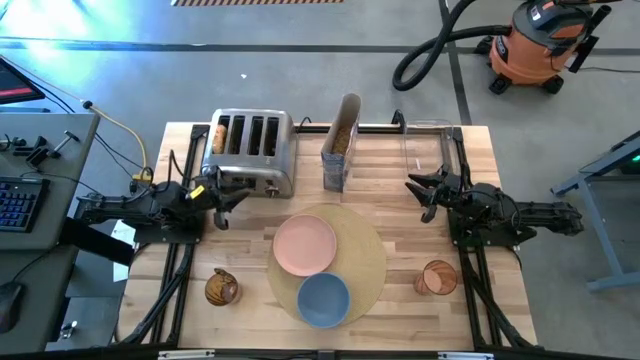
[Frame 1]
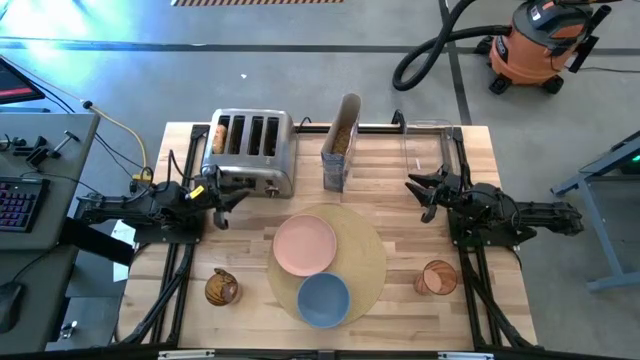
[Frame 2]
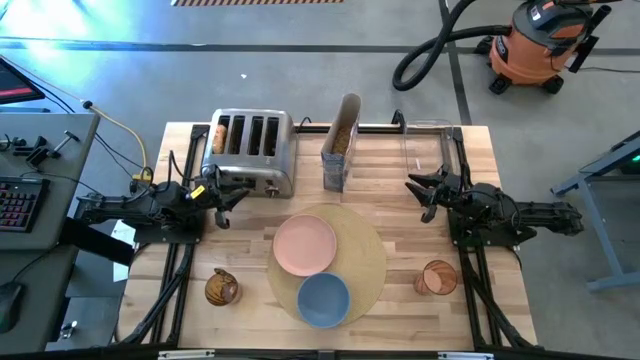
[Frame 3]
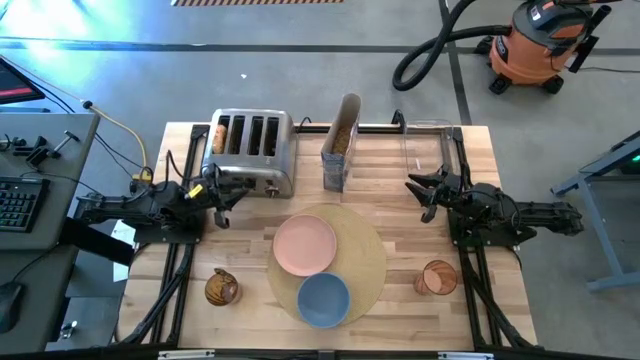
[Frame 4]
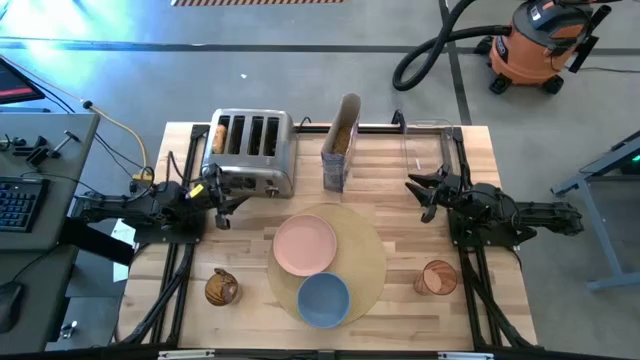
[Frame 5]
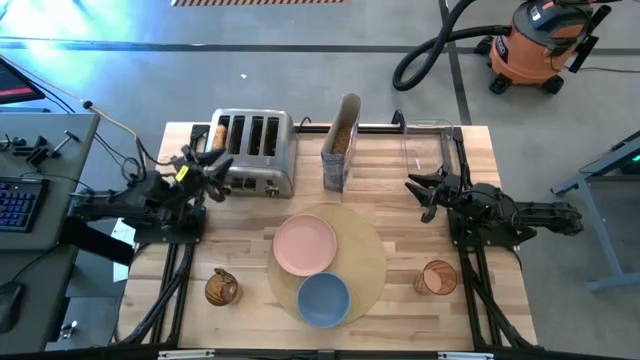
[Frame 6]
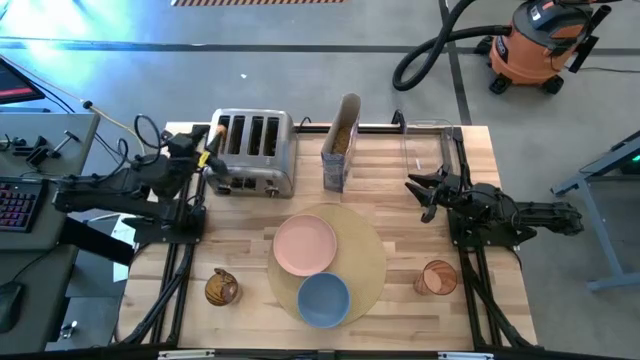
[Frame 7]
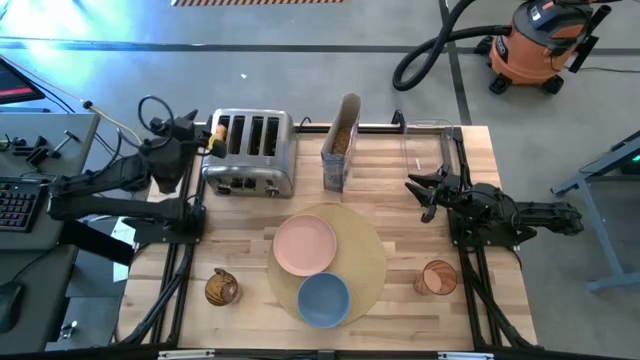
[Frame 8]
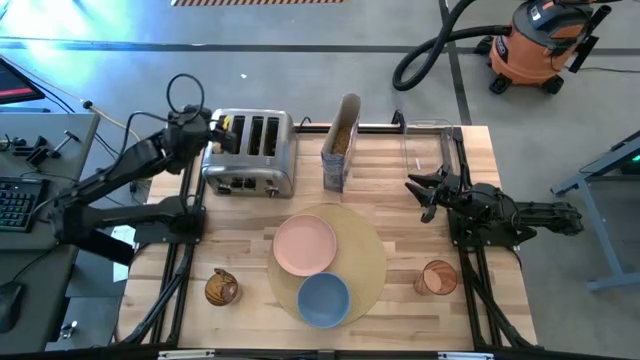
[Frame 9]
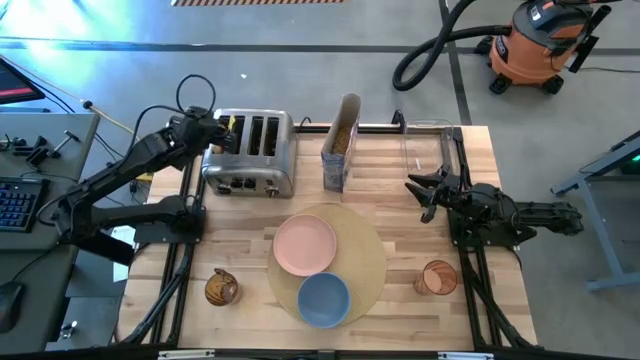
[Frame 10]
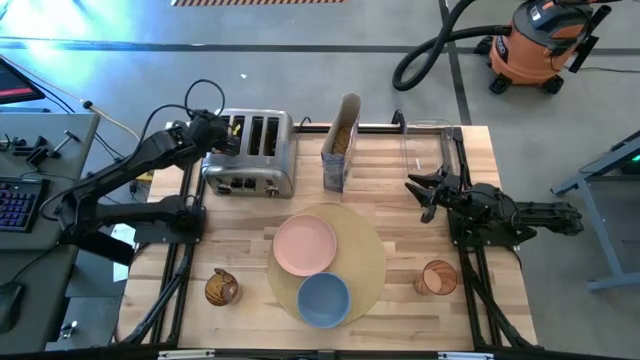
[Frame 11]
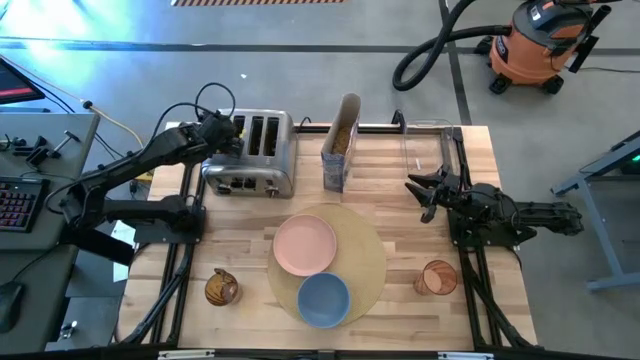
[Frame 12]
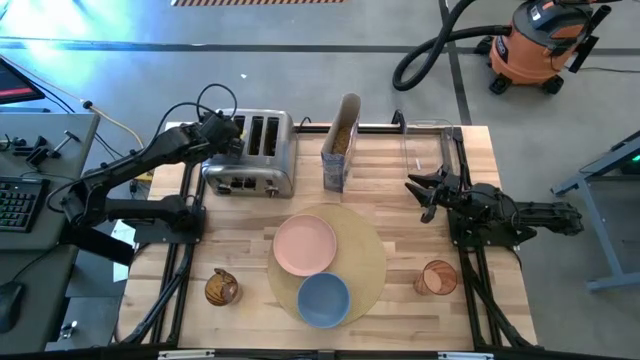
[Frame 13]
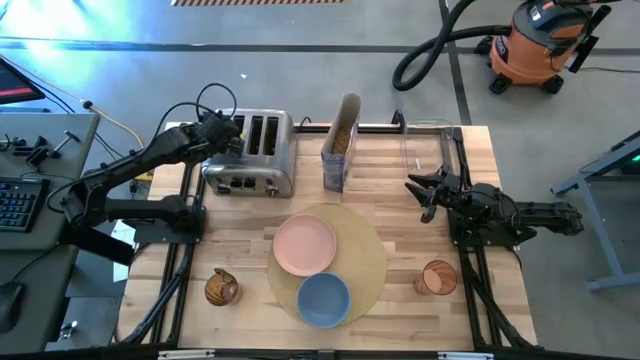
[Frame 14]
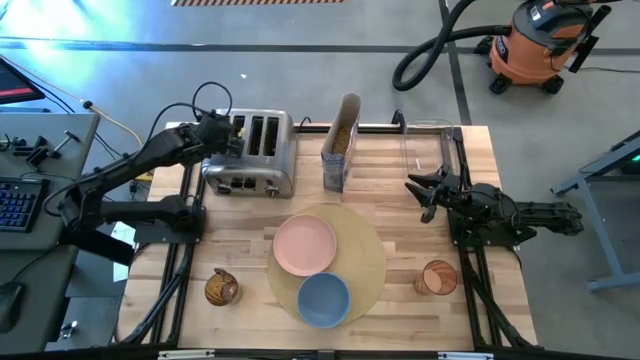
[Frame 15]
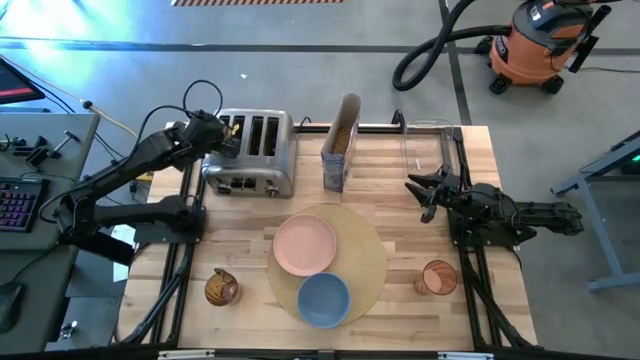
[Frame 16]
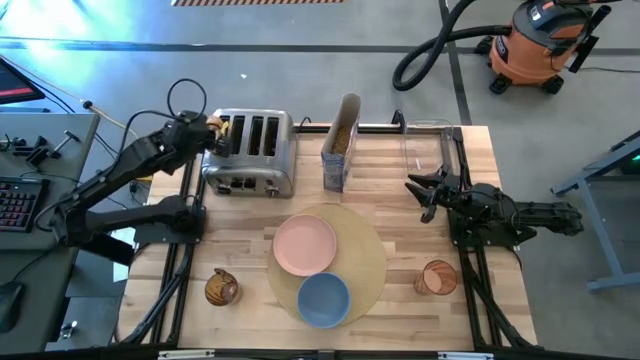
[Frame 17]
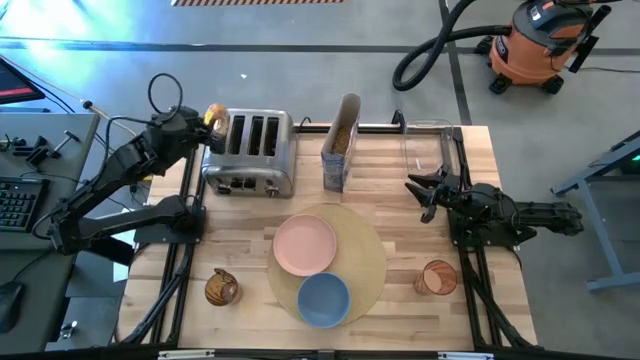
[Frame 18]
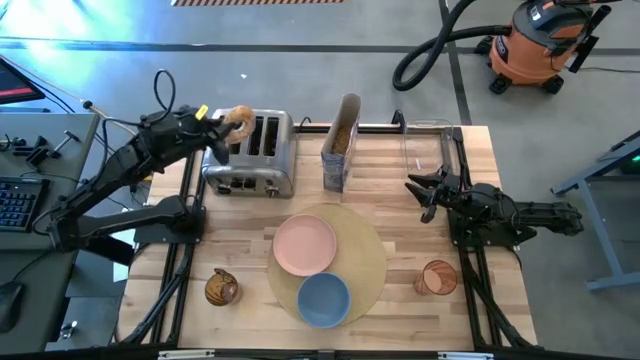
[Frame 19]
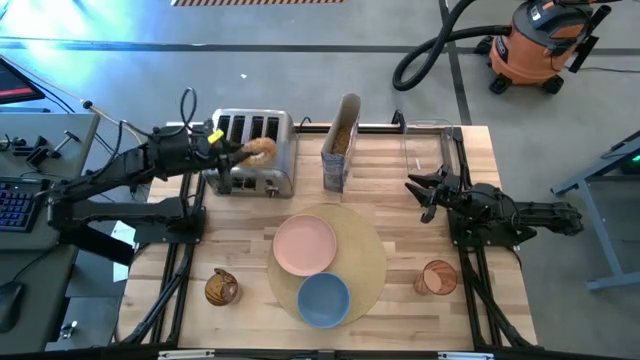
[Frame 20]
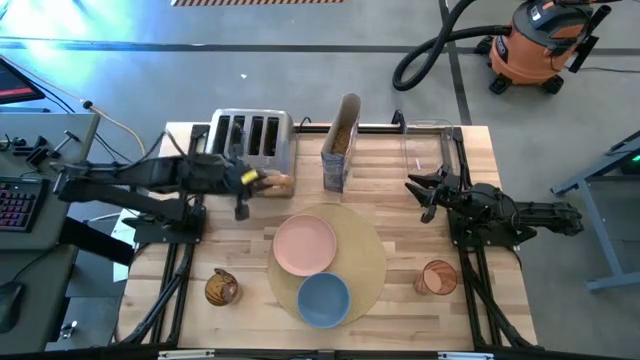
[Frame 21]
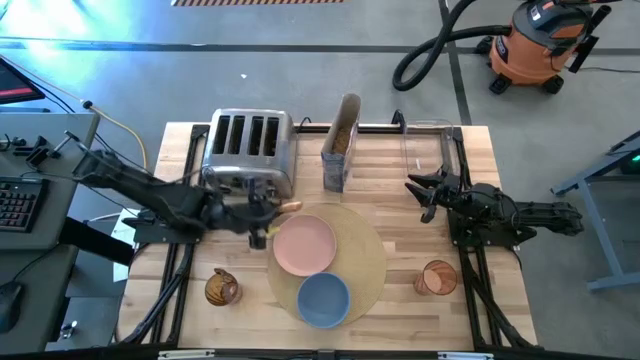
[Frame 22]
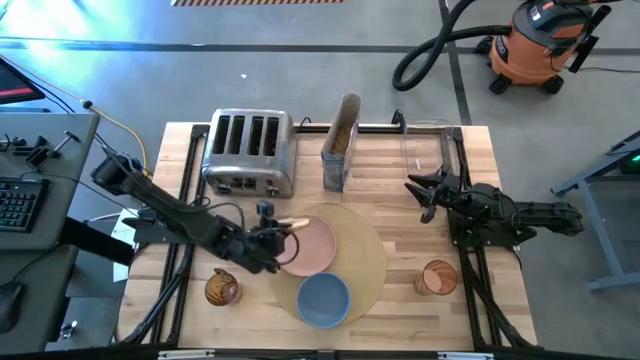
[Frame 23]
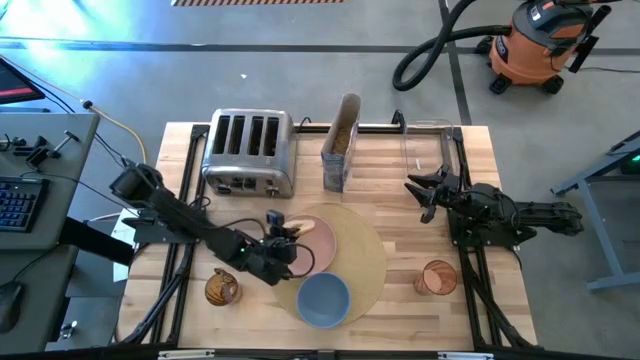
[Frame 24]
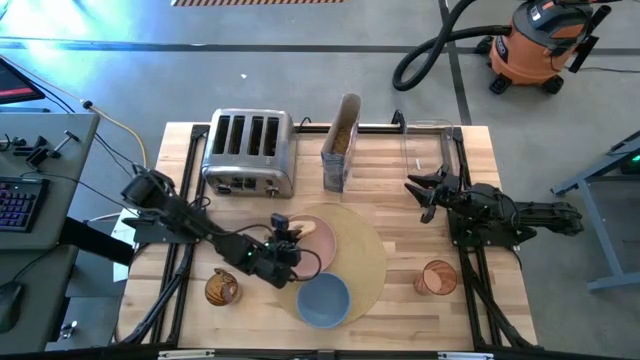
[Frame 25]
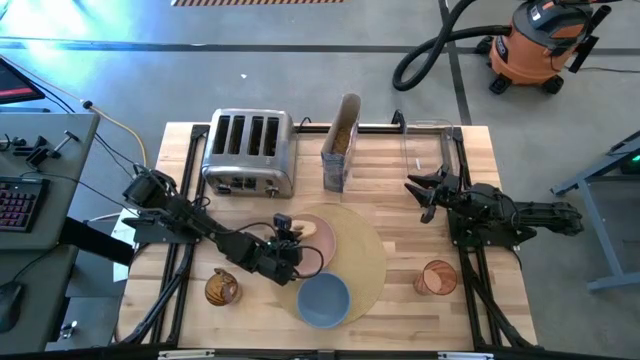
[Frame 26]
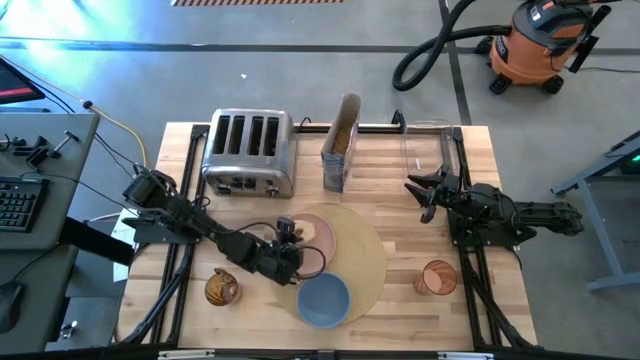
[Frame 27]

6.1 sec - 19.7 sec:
Task: Arrange a breakfast setting
Put the toasted bagel on the pink plate

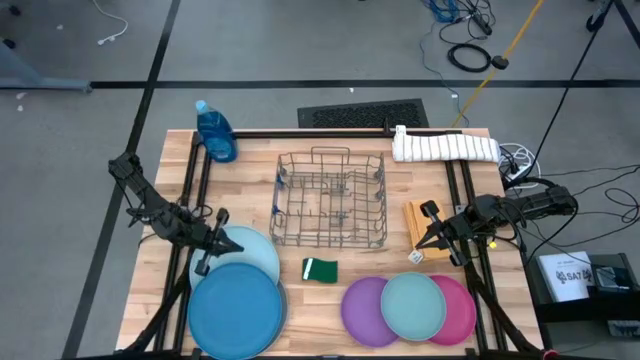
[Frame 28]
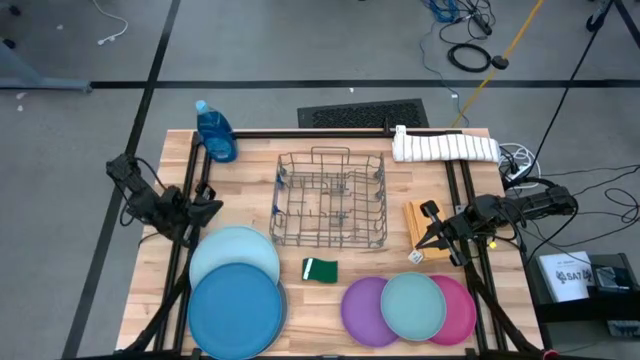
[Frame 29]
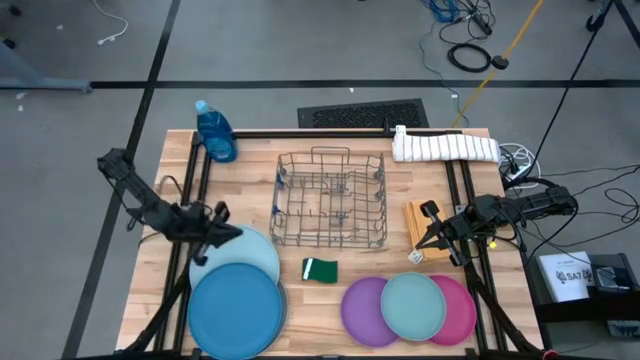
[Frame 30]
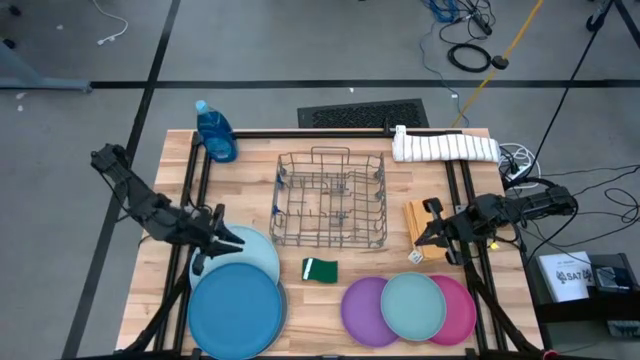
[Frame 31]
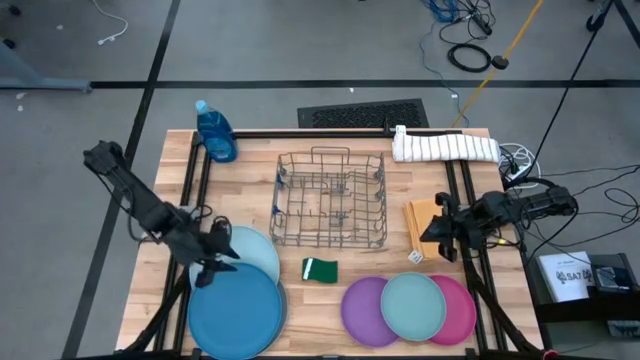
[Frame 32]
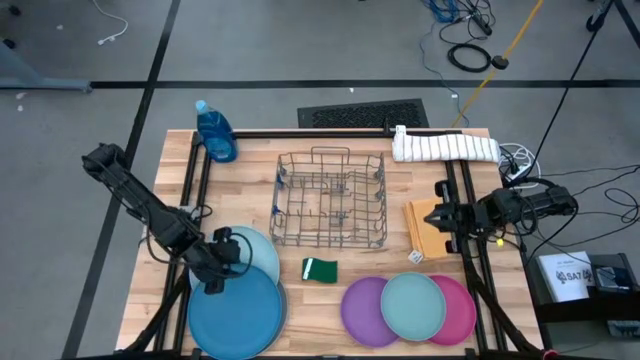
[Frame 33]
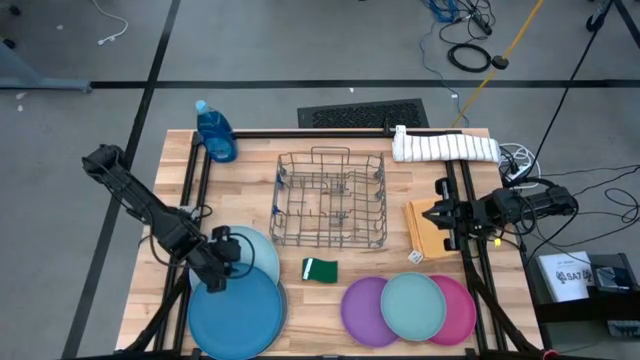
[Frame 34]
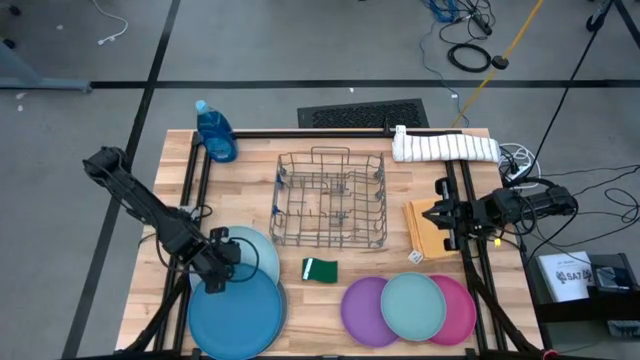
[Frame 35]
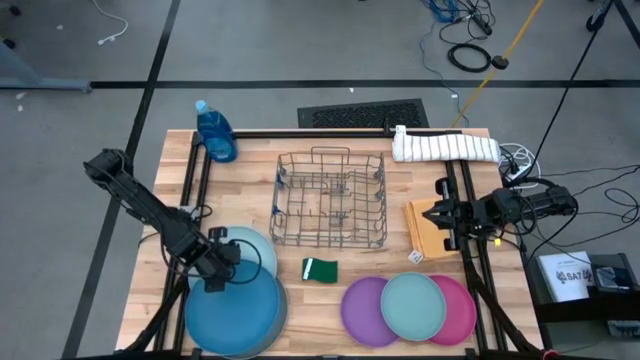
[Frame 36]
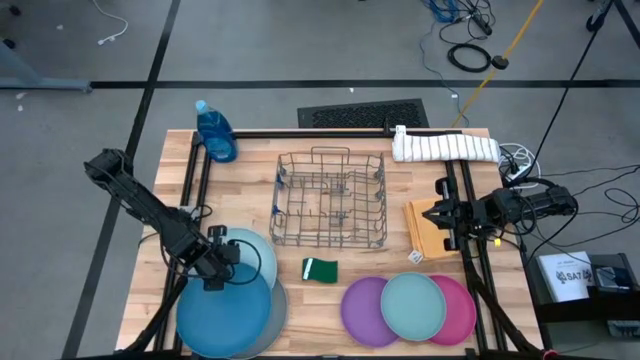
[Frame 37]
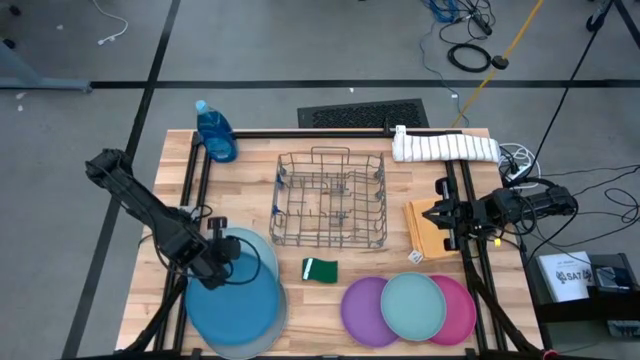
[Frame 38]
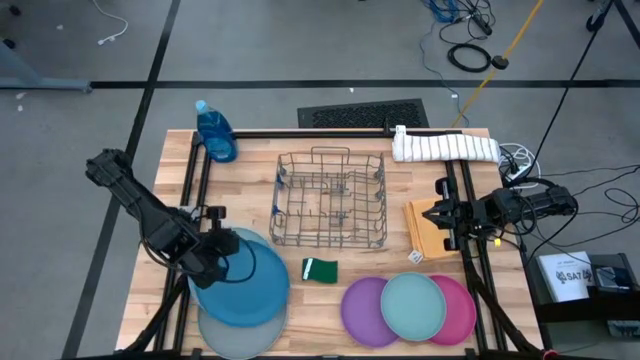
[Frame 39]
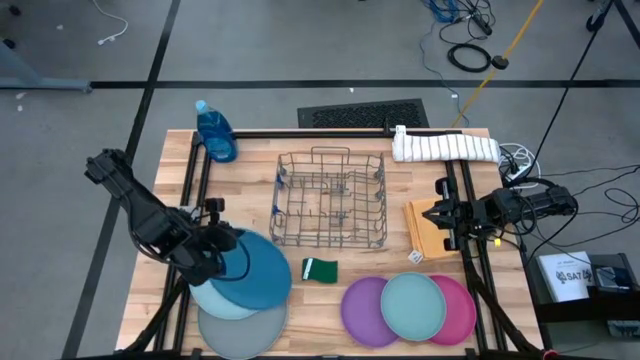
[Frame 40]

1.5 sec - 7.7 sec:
Task: Sort dishes
Put the blue plate in the dish rack
